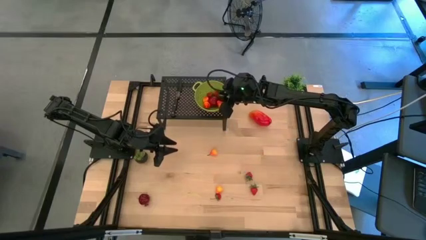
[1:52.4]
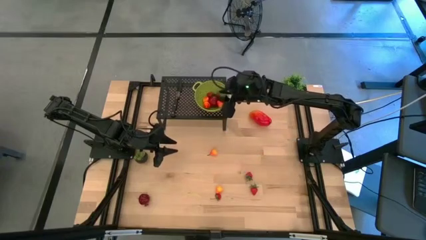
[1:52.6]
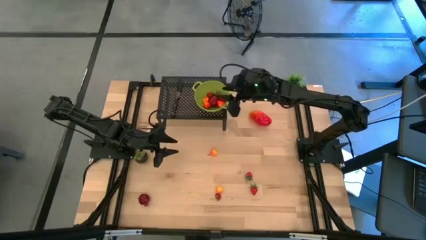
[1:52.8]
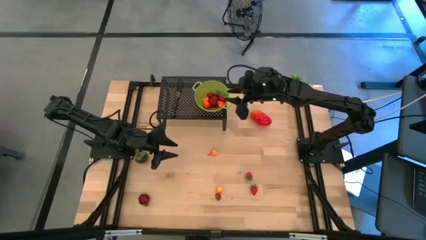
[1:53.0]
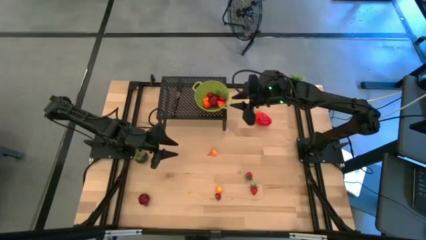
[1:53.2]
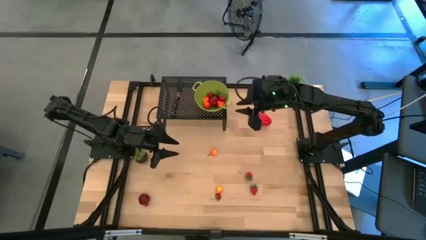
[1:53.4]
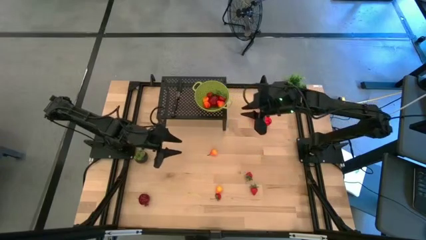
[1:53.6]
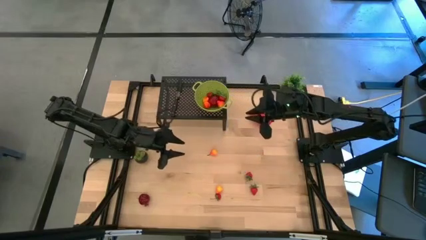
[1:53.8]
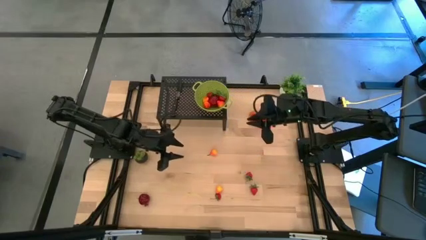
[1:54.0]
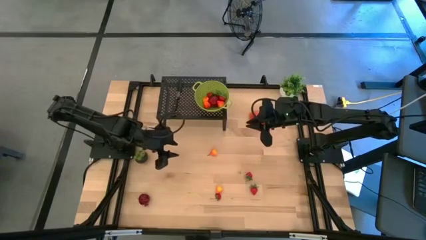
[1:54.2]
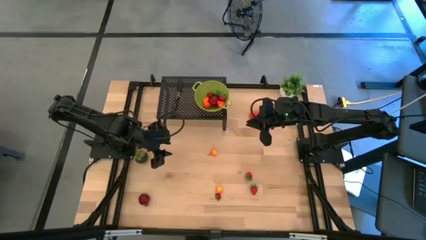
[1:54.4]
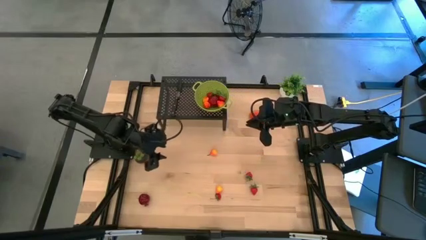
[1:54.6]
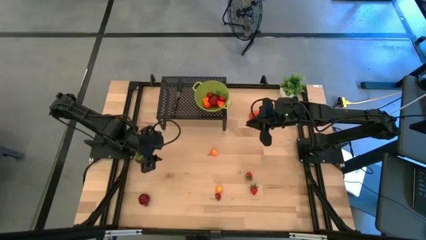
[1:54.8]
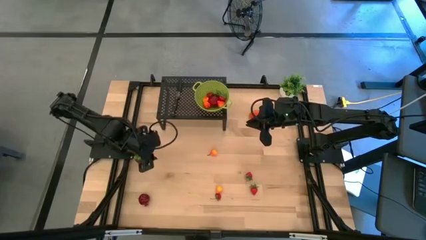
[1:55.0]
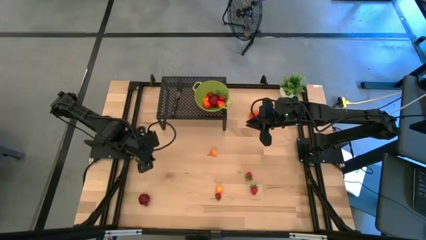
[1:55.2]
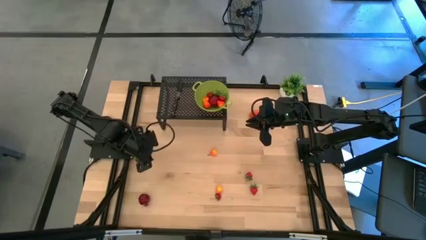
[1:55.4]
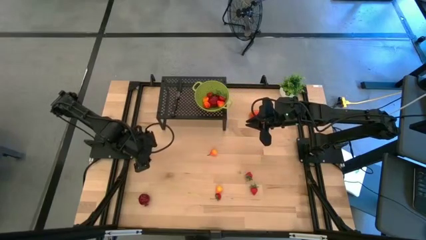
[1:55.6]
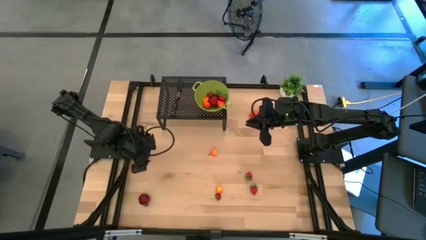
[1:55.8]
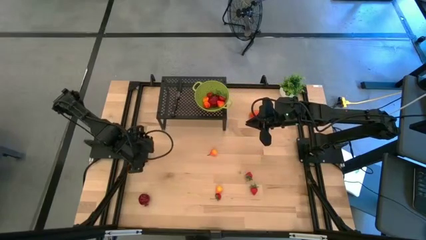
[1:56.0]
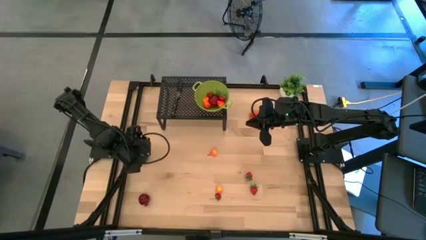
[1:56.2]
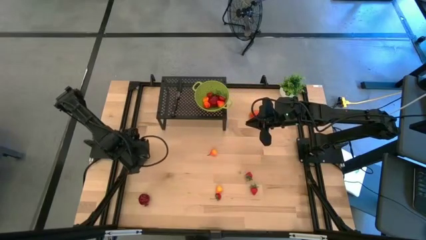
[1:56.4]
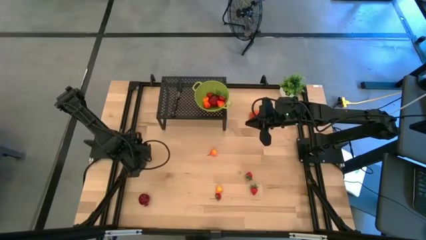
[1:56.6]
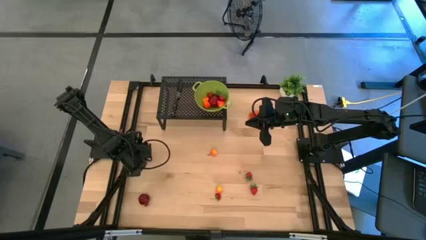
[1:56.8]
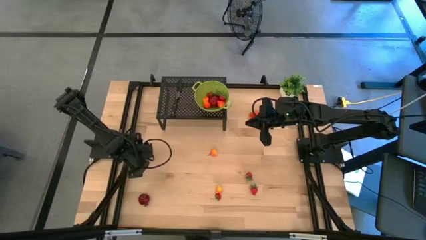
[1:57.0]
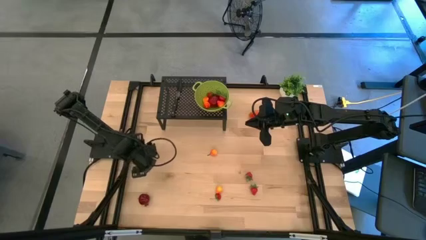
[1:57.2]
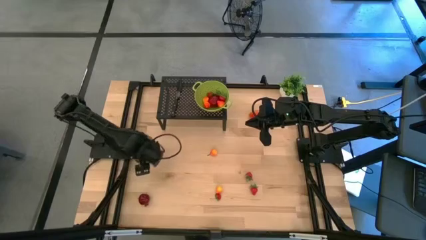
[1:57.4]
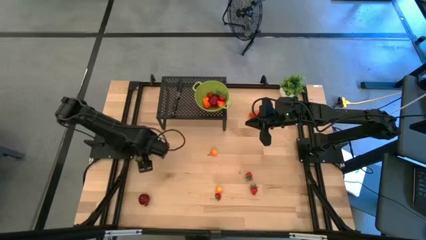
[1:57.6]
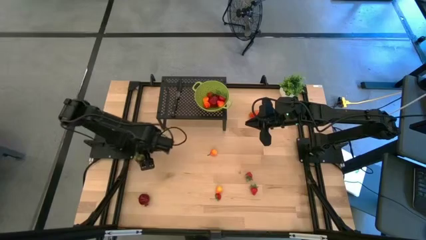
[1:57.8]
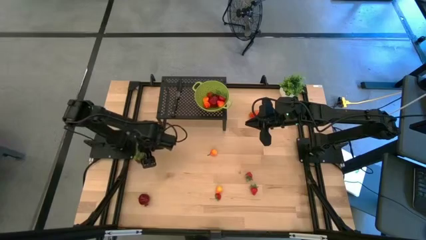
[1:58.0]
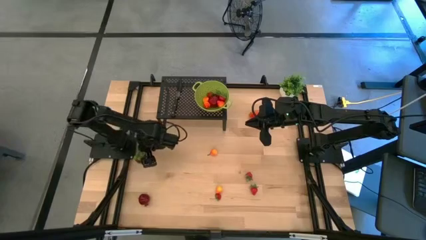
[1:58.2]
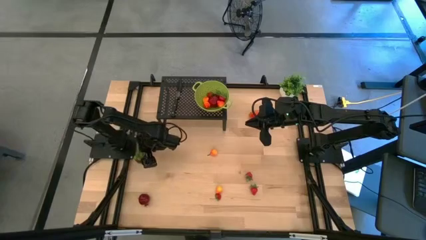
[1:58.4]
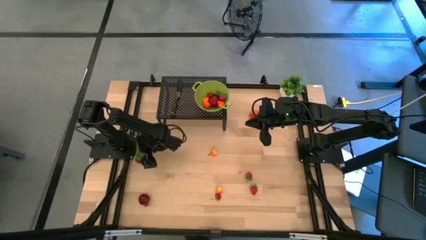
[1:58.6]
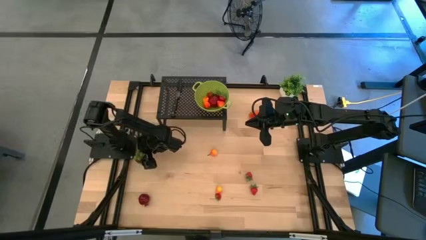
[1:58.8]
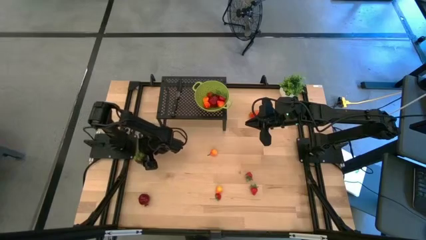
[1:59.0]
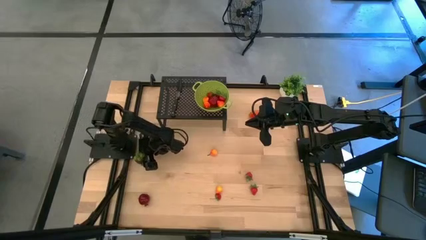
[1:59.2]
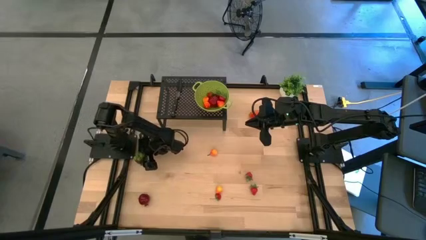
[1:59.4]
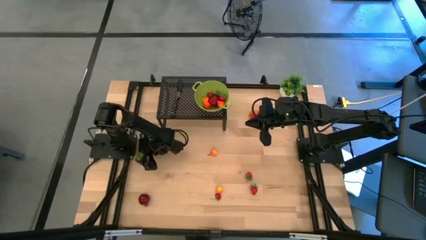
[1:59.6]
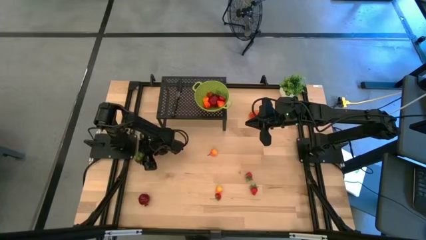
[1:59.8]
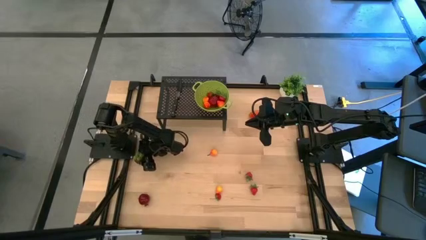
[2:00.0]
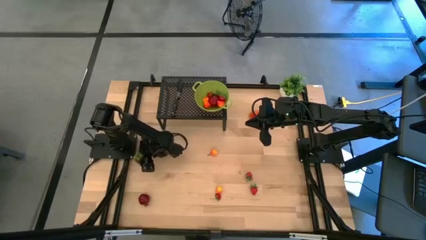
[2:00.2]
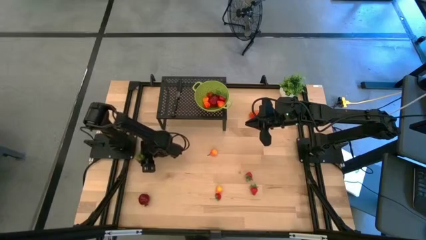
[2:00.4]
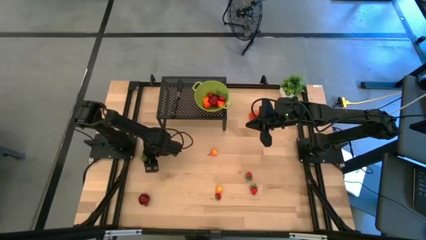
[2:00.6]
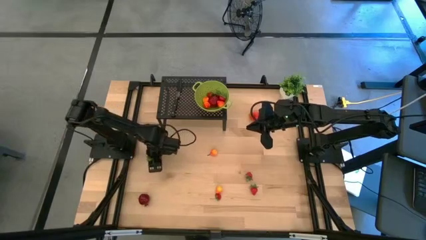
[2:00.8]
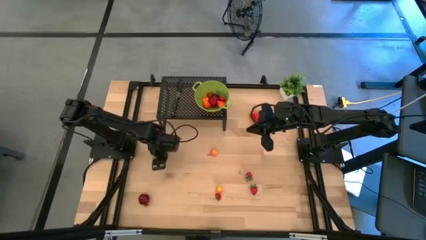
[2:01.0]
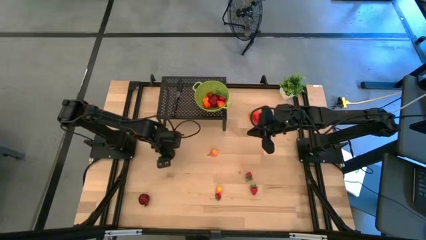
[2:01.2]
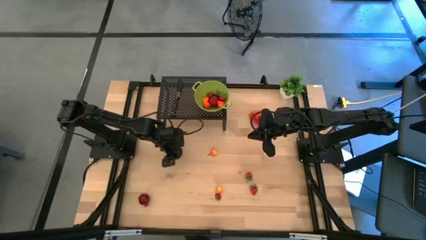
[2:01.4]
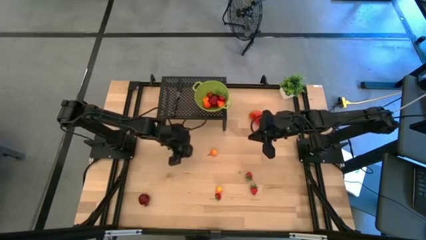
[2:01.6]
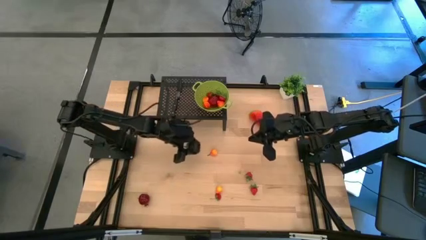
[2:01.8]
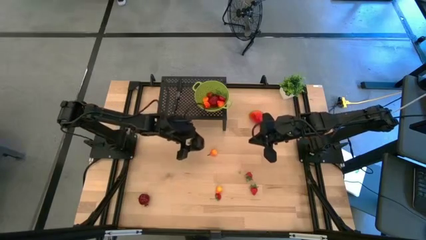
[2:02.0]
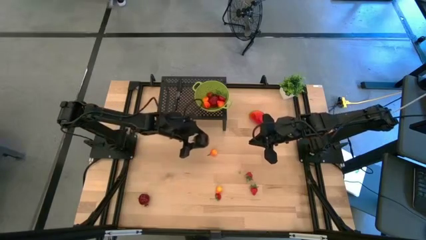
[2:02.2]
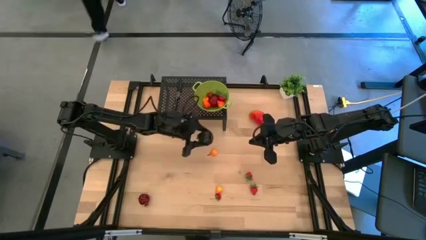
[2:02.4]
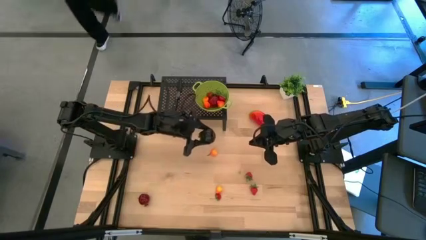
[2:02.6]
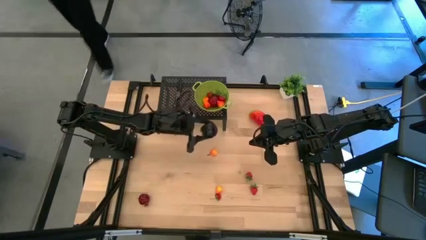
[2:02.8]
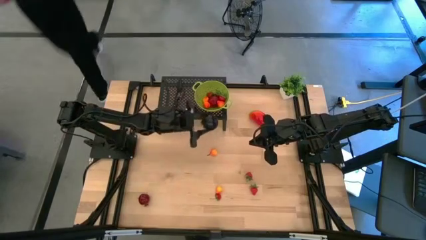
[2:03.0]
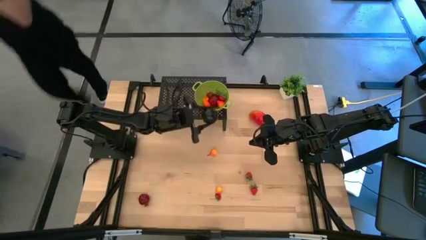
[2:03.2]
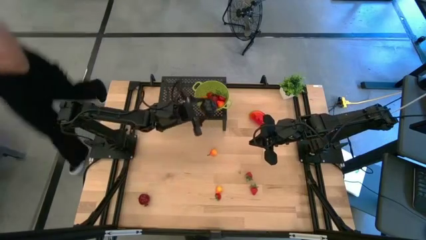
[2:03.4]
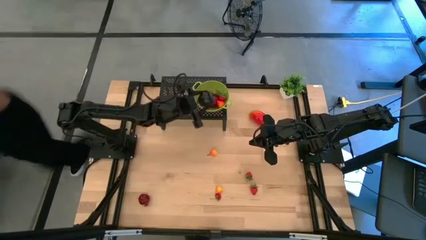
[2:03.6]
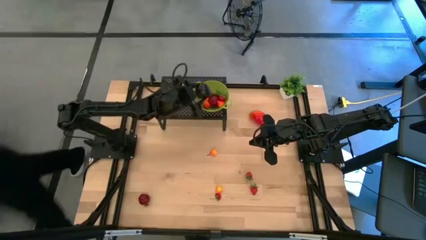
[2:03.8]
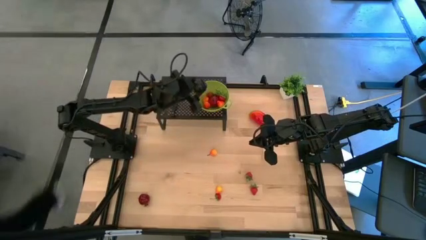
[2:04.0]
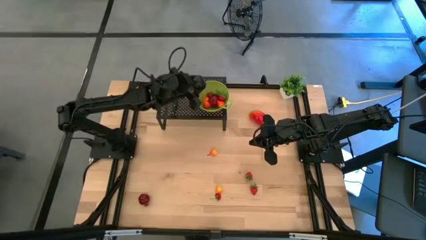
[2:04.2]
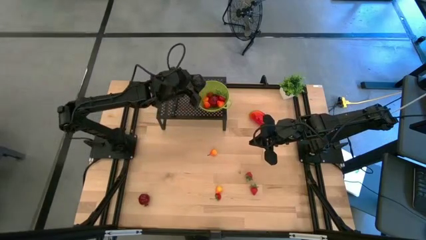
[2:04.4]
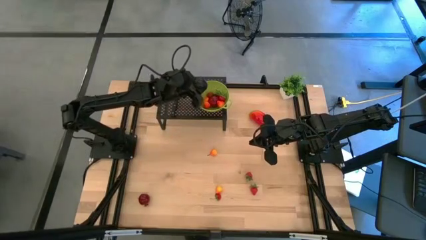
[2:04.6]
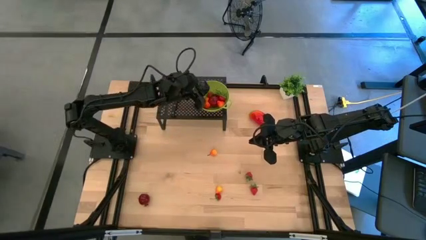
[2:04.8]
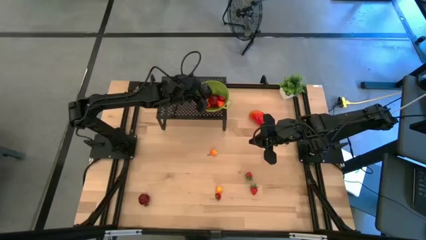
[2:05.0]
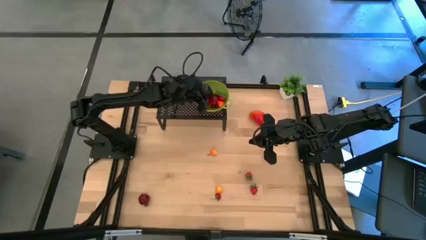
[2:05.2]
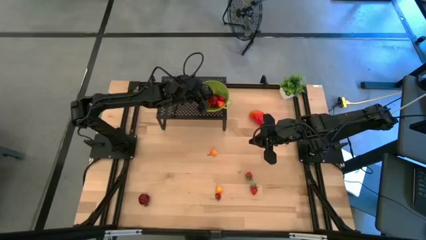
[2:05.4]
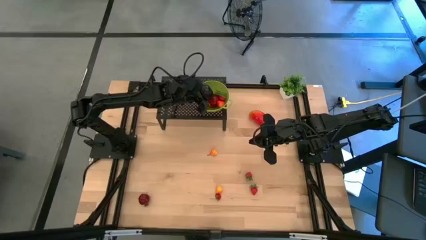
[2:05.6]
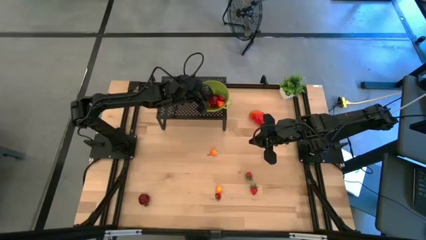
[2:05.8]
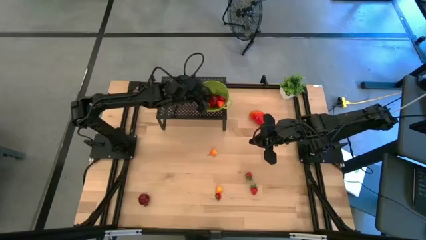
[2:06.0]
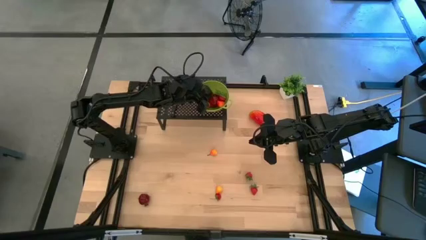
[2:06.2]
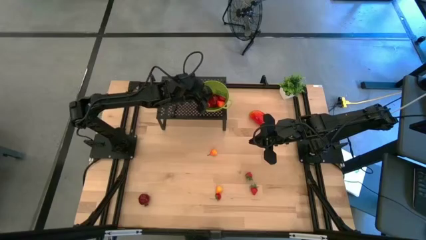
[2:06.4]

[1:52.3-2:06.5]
Task: Pick & Place Fruit
Put the plum into the green strainer bowl on the shelf

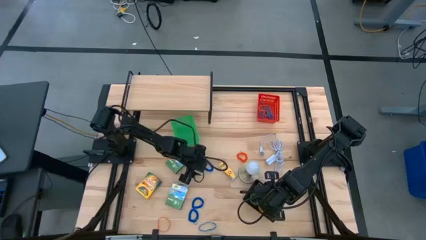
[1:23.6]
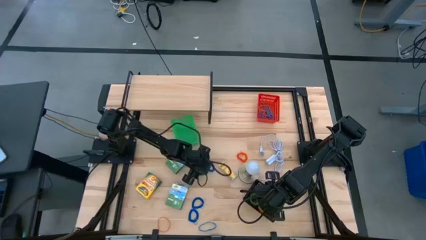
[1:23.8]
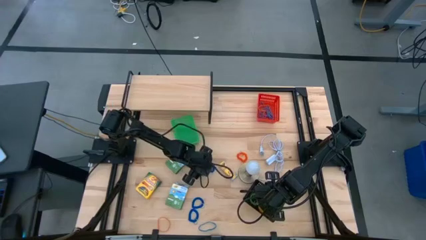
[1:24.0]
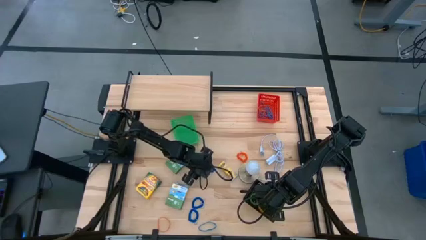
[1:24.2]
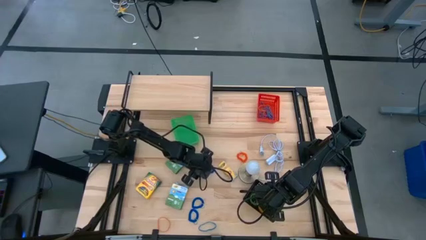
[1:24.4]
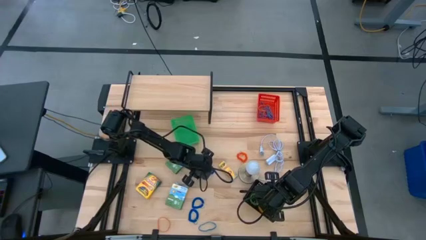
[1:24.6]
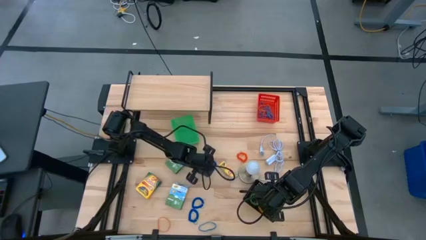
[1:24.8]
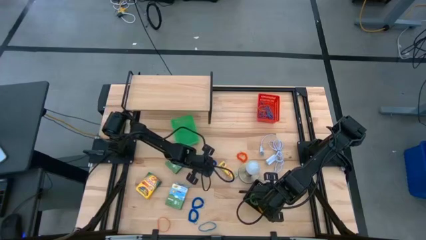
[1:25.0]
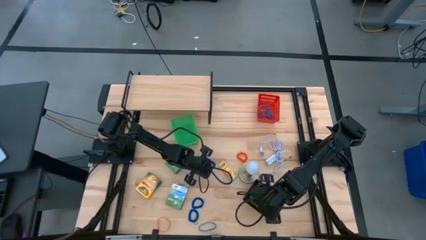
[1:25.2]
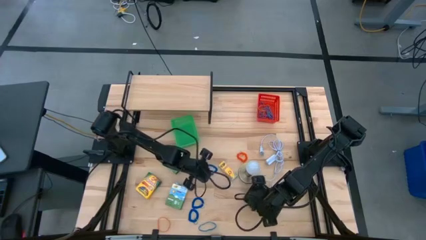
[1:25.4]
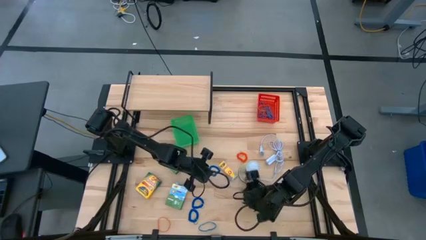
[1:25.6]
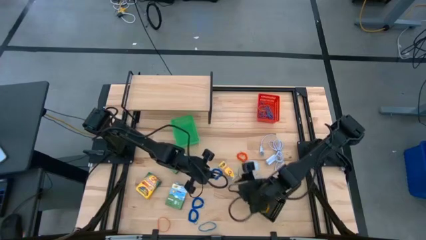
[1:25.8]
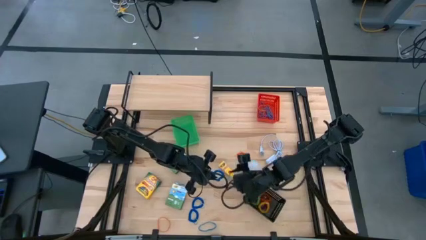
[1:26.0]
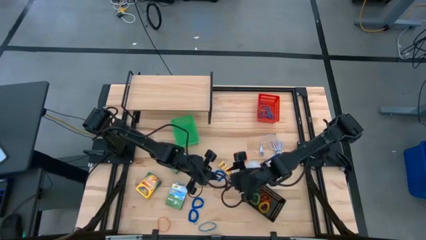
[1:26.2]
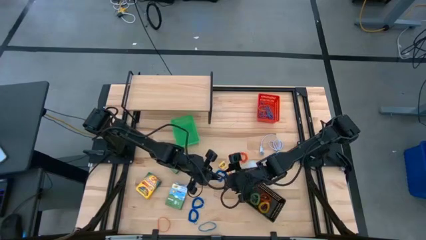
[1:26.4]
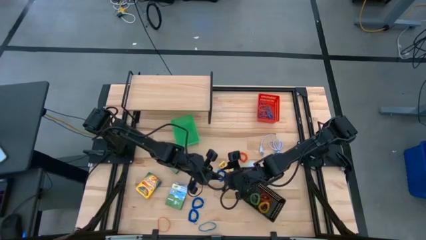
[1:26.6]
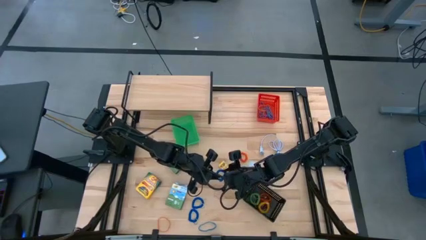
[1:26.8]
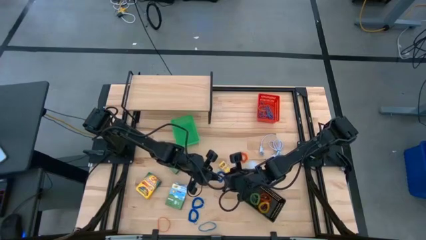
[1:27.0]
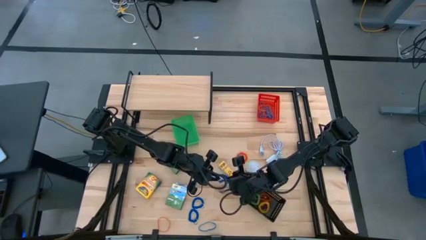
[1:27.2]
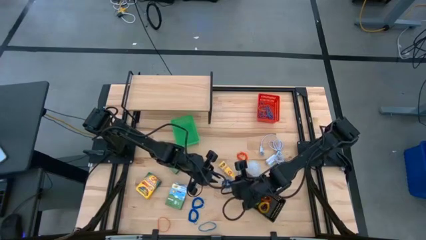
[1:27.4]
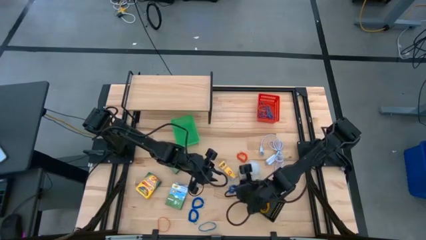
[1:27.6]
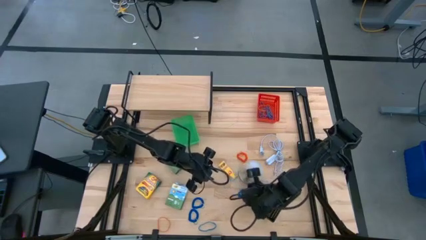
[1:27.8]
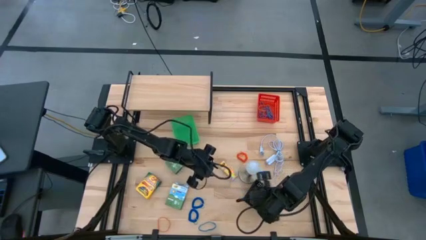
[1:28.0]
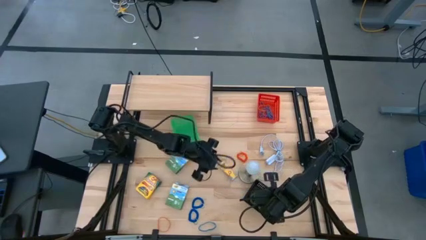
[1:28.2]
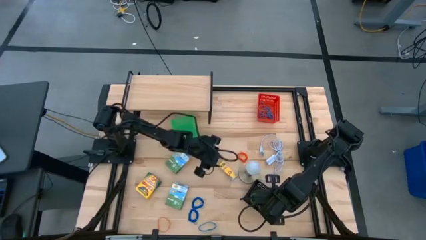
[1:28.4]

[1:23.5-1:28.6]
Task: Pick & Place Office Desk Supplies
Put the blue spring keychain into the black basket
